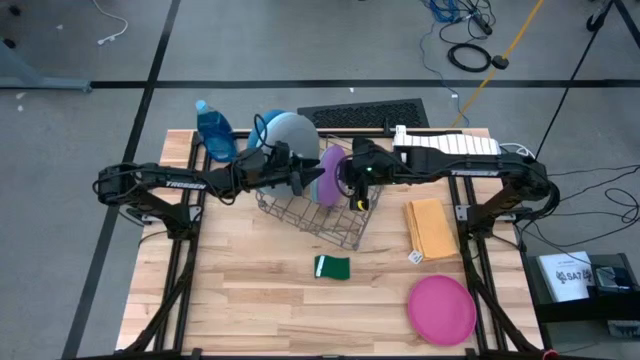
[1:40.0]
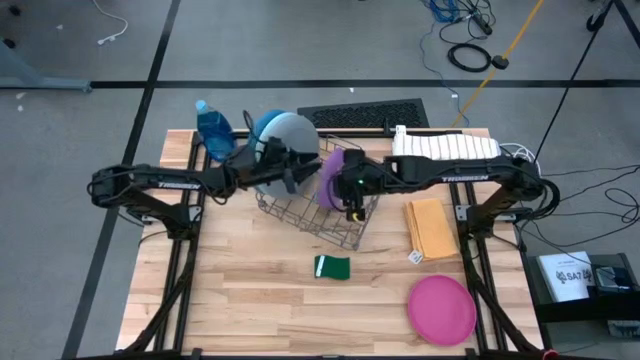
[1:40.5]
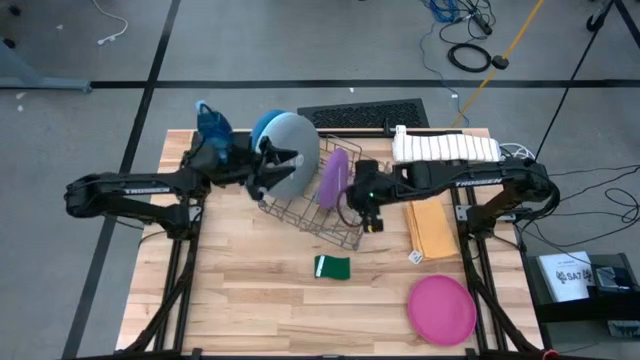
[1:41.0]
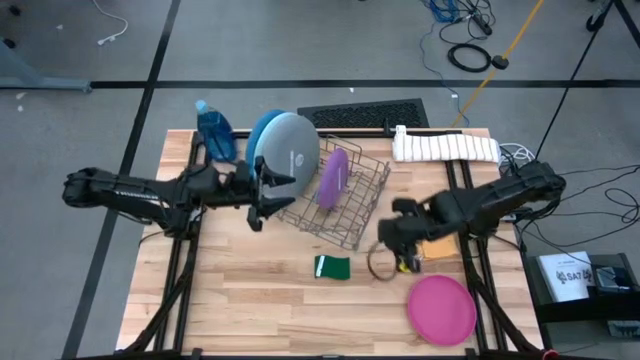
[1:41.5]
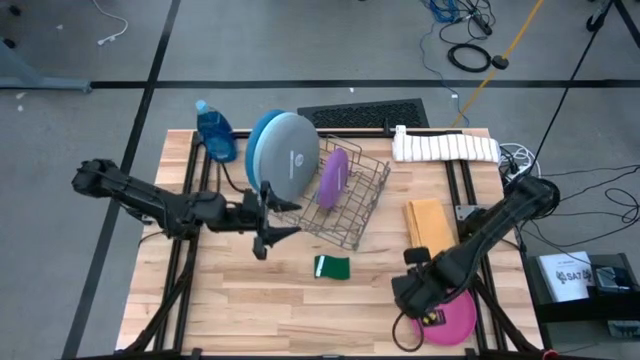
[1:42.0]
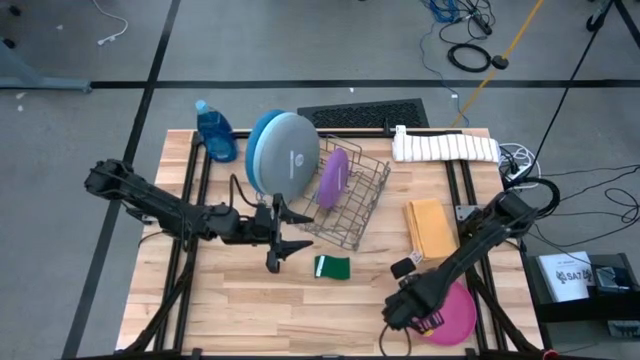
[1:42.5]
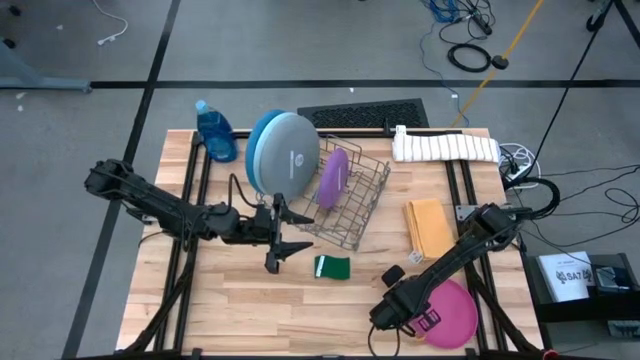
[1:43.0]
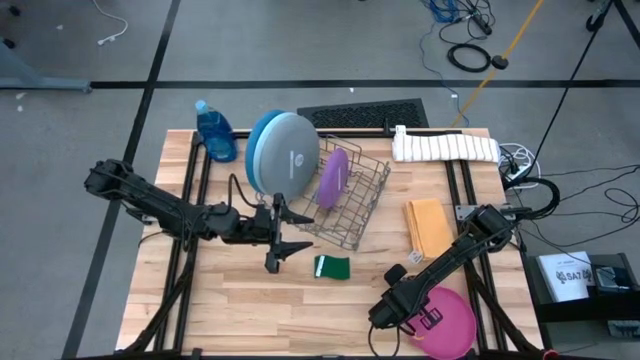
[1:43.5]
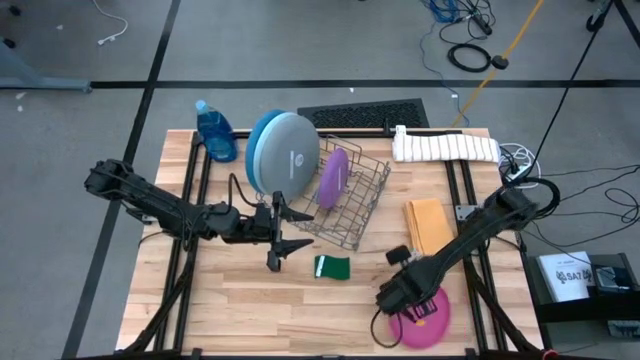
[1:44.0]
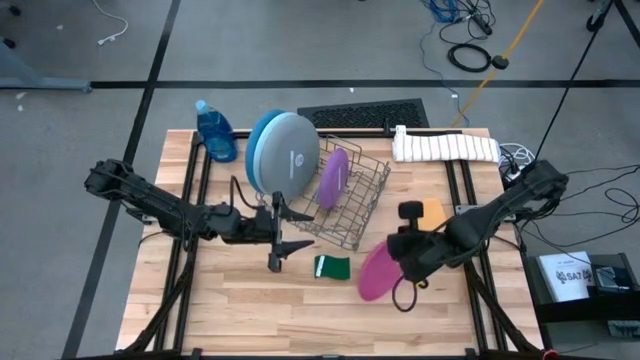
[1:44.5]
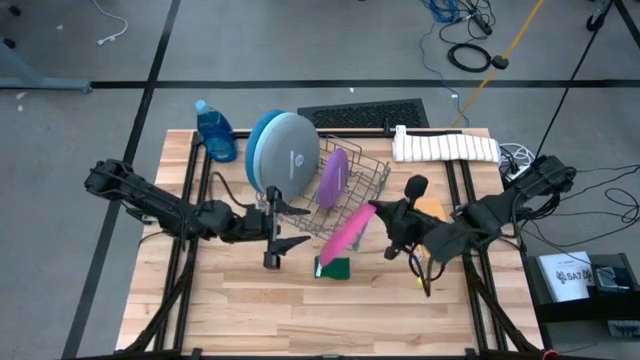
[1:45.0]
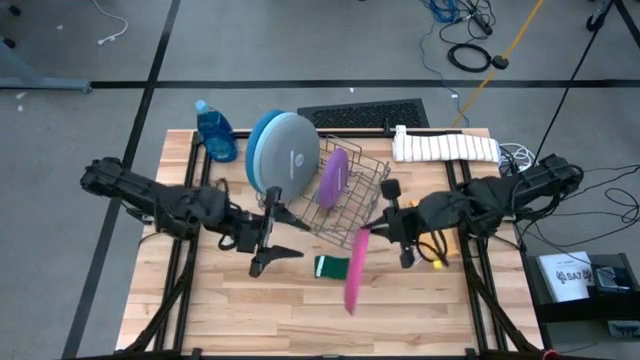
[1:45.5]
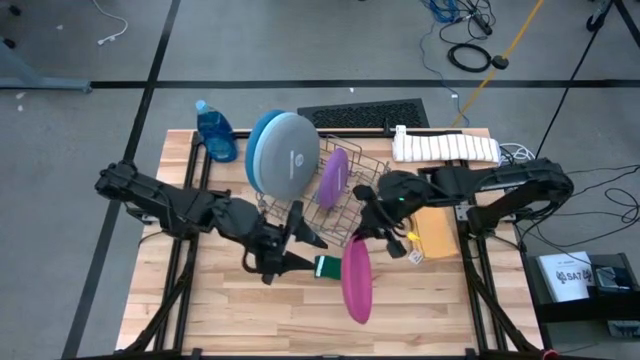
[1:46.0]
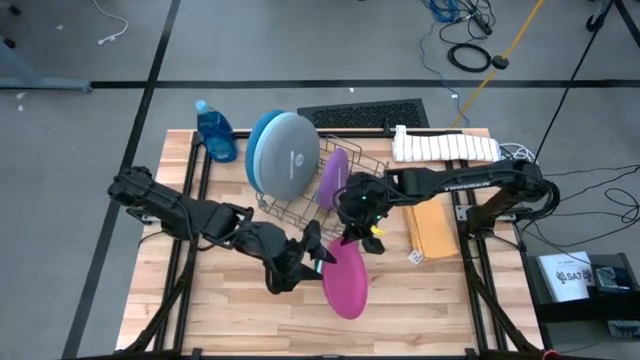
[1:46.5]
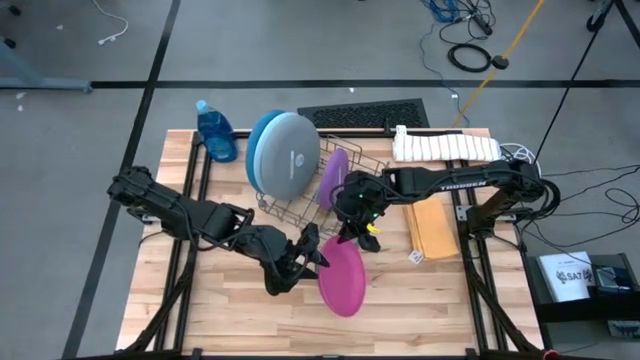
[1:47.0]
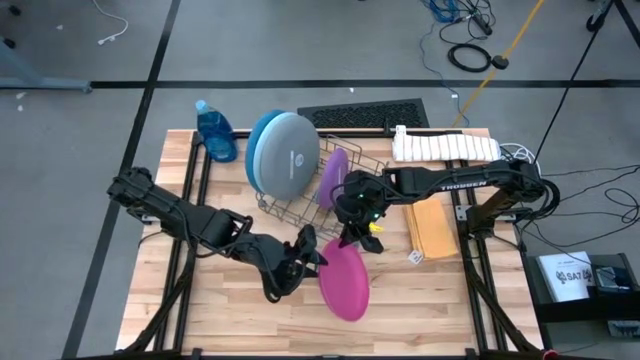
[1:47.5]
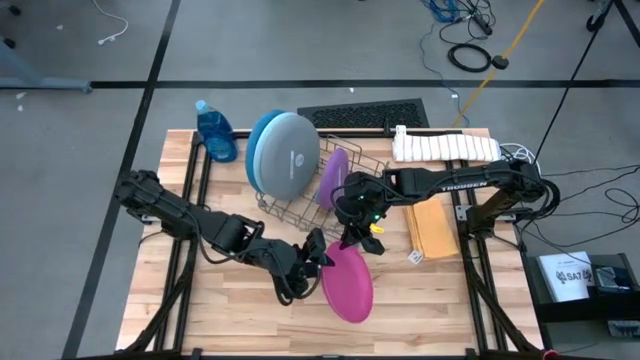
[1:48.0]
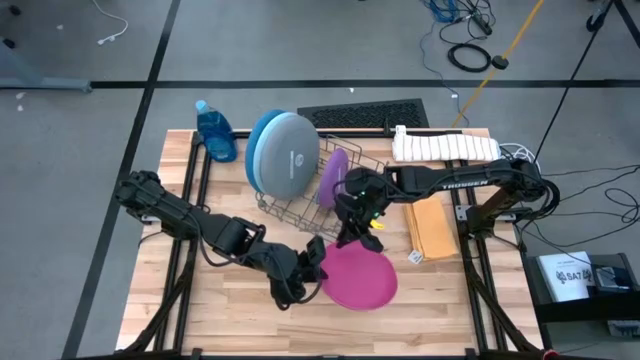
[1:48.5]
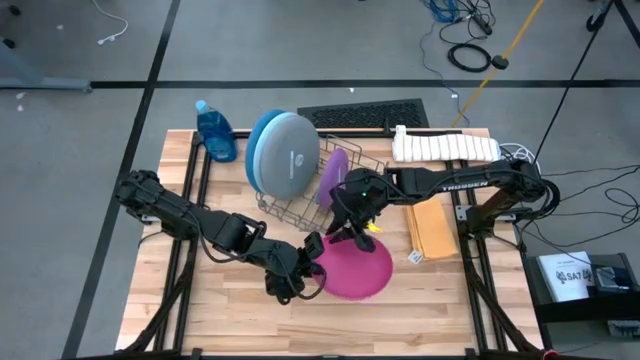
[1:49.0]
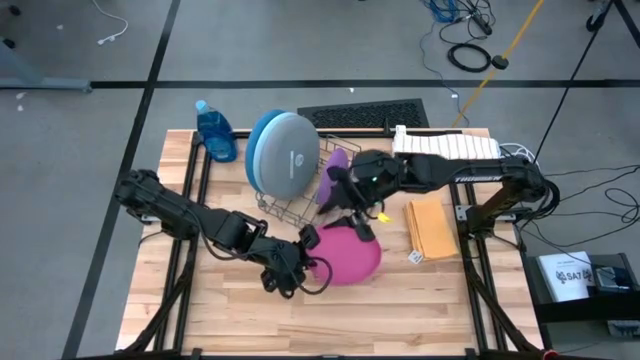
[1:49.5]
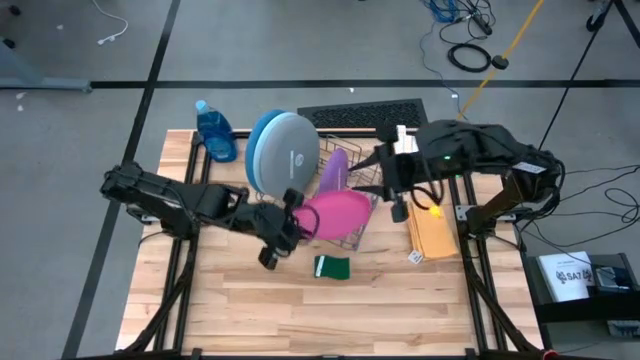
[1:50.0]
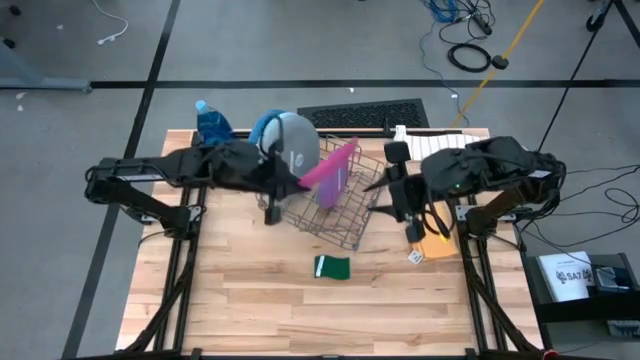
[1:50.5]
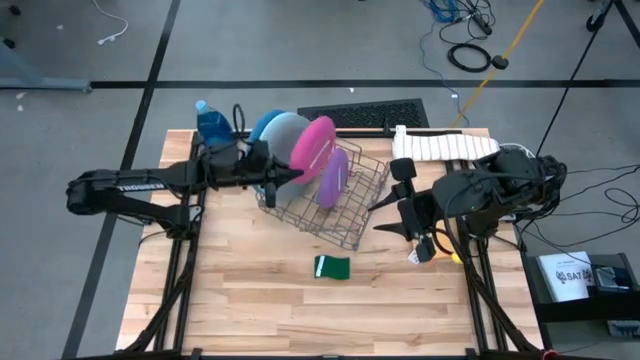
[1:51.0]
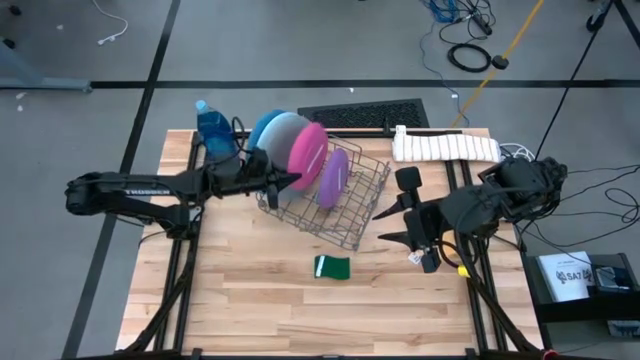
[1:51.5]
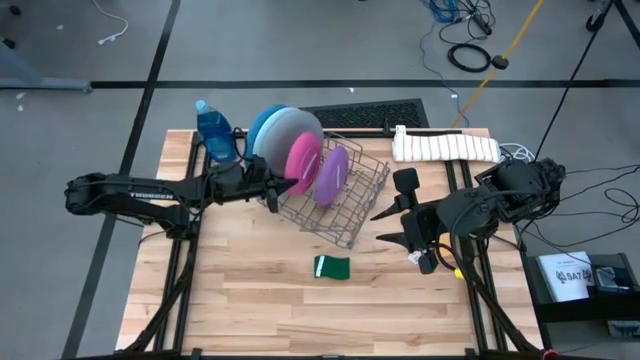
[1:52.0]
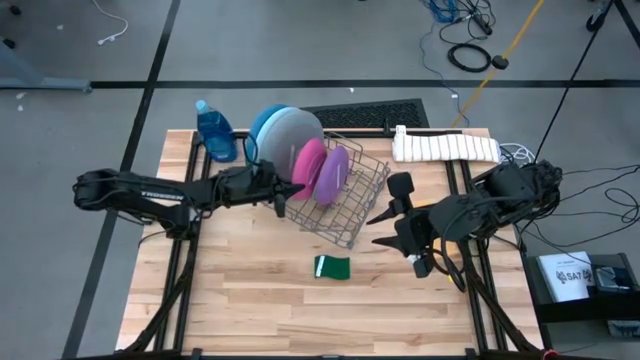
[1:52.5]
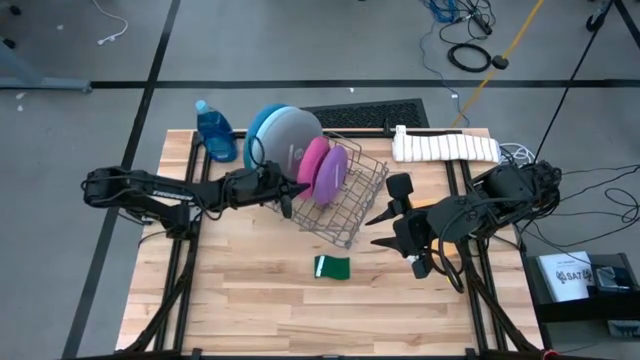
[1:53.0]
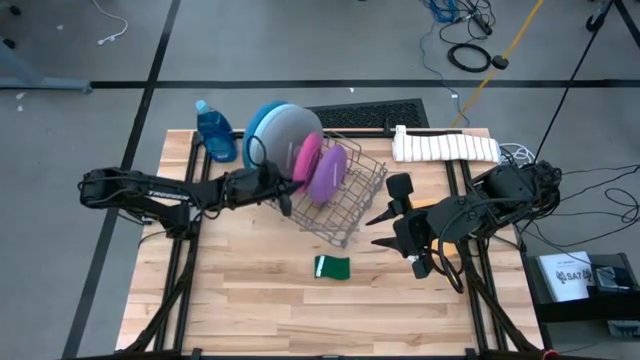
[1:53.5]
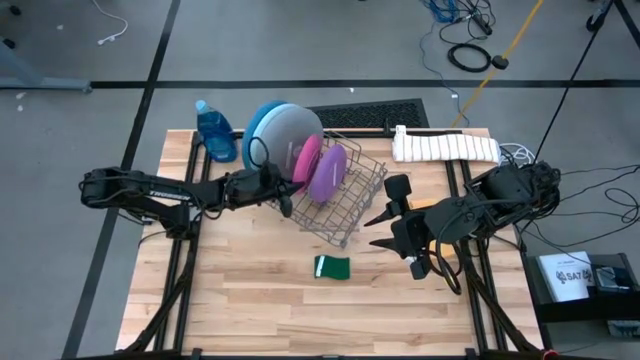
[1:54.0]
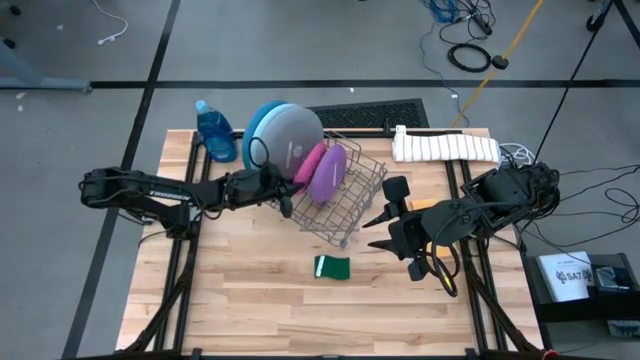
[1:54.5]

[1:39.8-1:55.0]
Task: Sort dishes
Put the pink plate in the dish rack

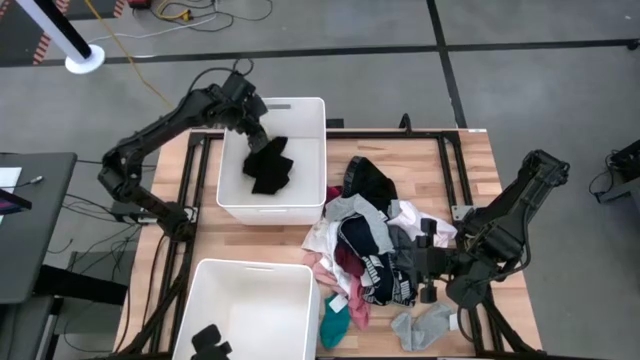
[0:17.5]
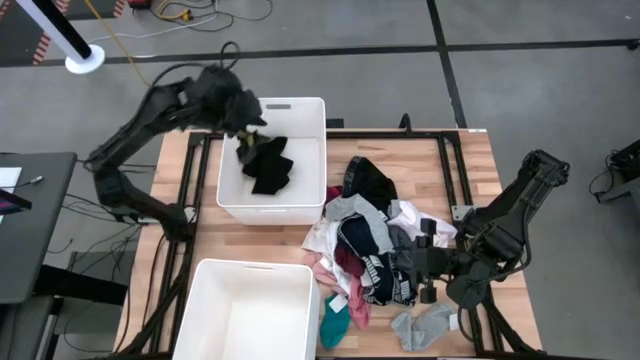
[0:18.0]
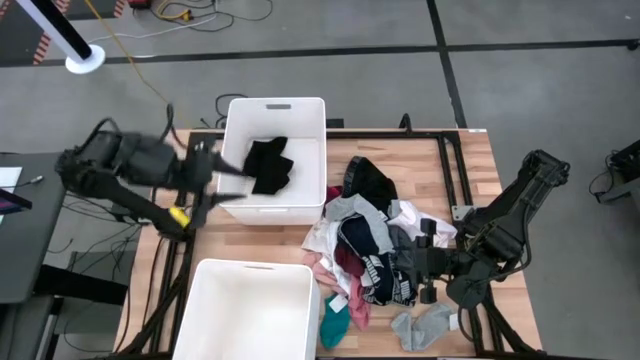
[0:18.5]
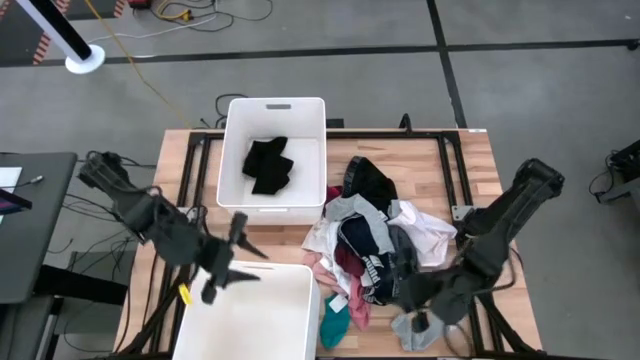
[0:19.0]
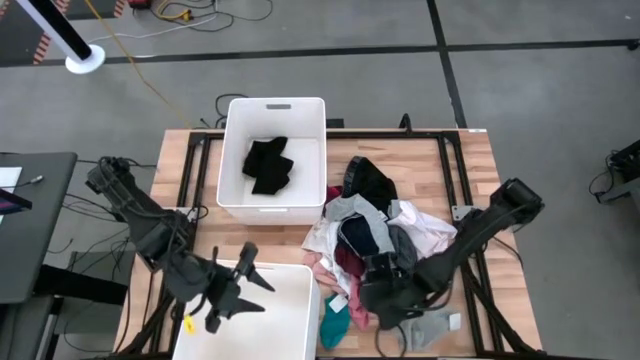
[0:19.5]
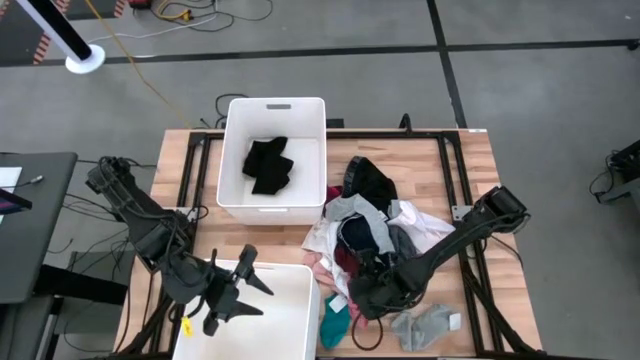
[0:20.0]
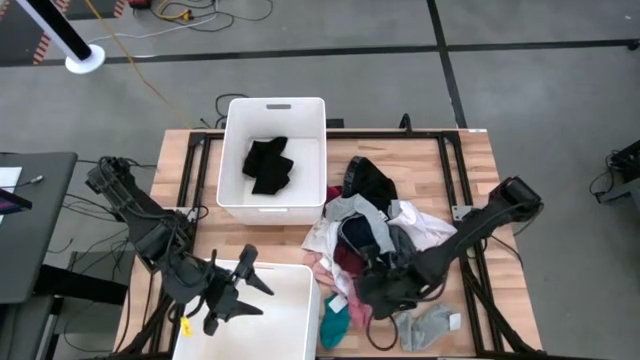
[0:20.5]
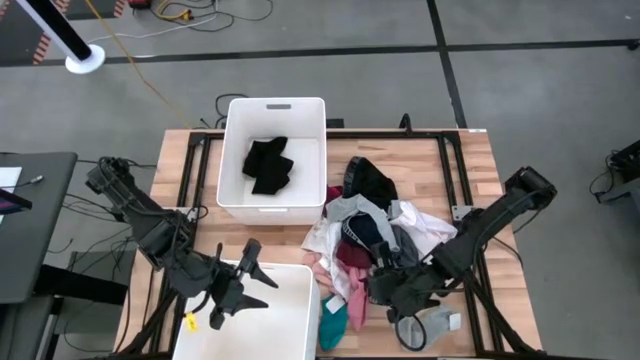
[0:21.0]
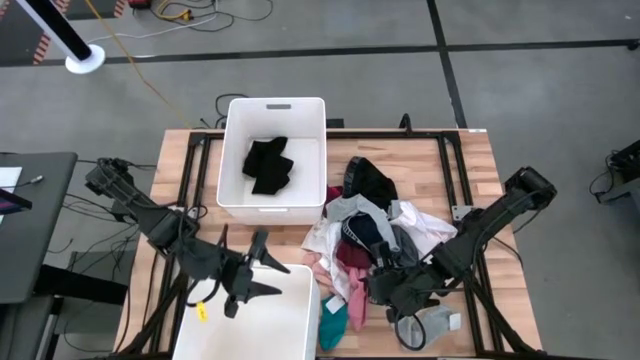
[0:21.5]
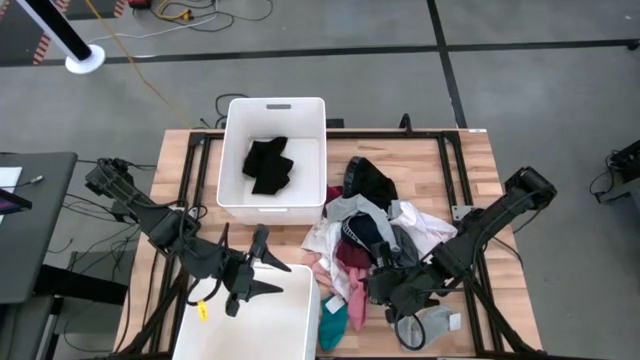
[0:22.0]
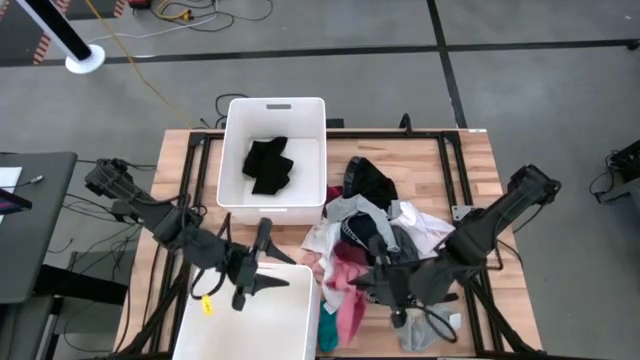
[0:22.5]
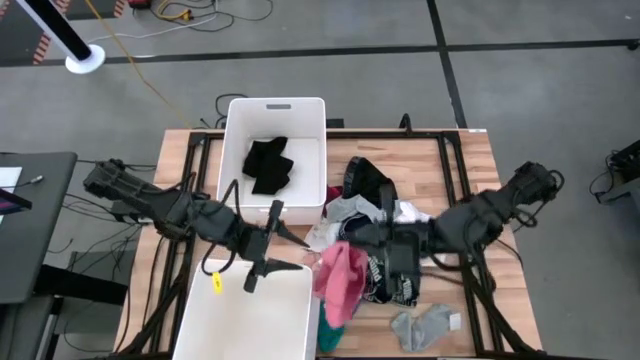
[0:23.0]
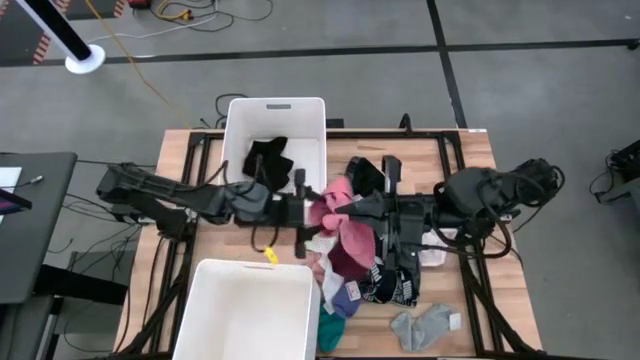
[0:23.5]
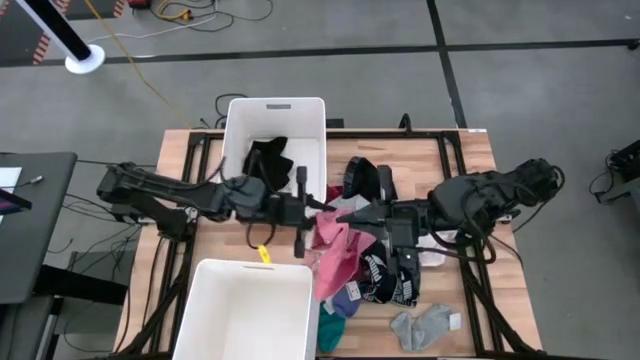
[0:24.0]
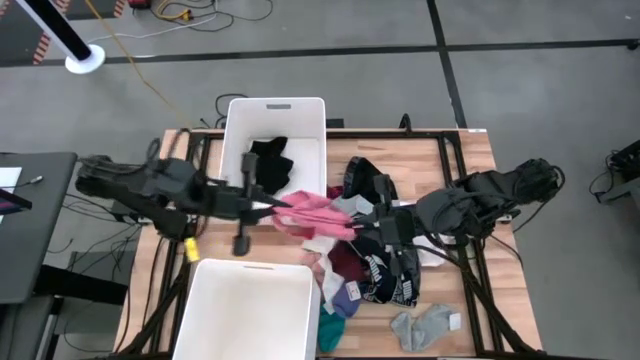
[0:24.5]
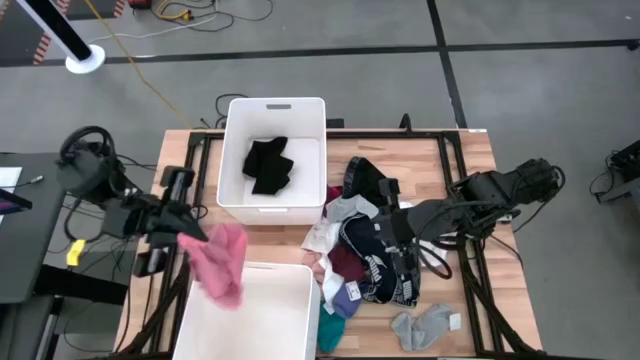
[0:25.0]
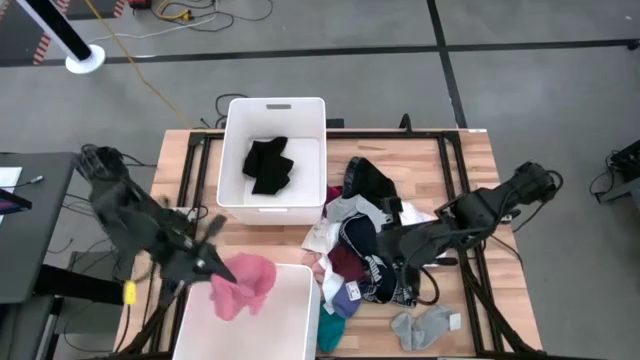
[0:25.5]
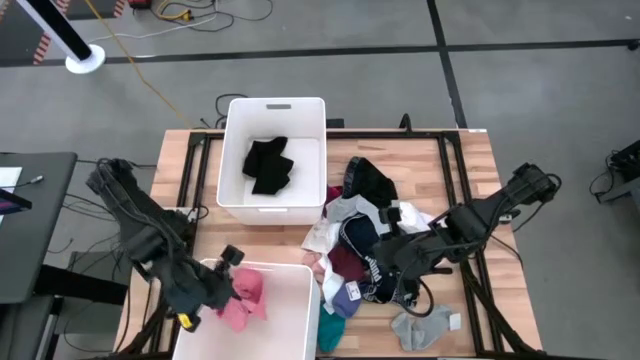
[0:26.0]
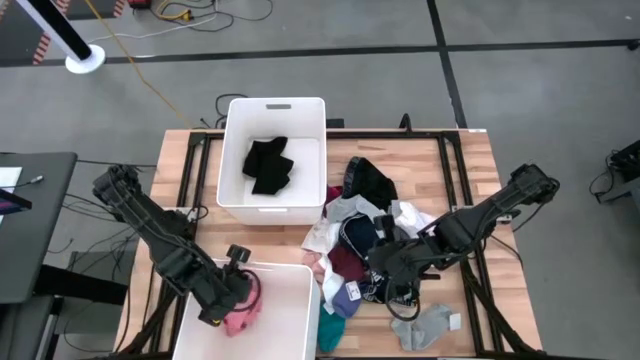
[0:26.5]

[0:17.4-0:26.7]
Task: Sort clothes
Put the pink underwear into the bottom white laundry bin
